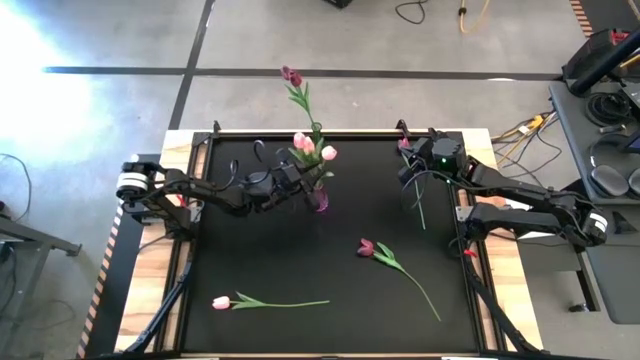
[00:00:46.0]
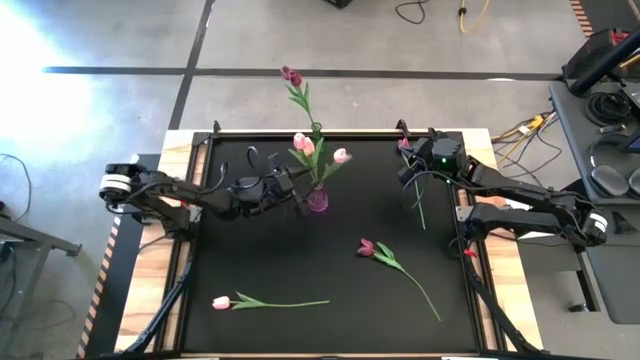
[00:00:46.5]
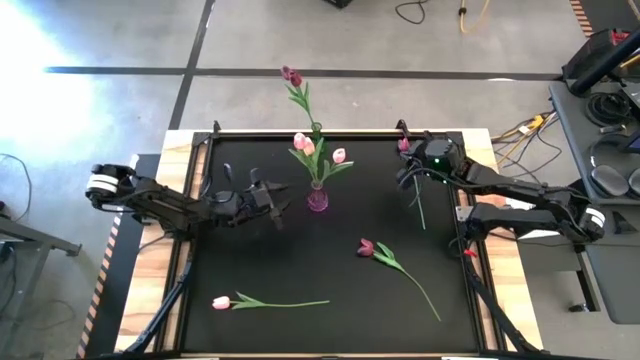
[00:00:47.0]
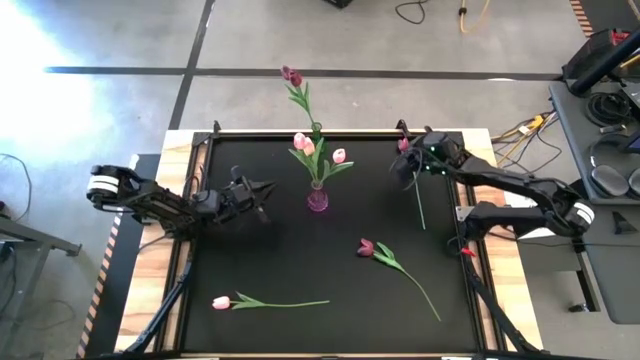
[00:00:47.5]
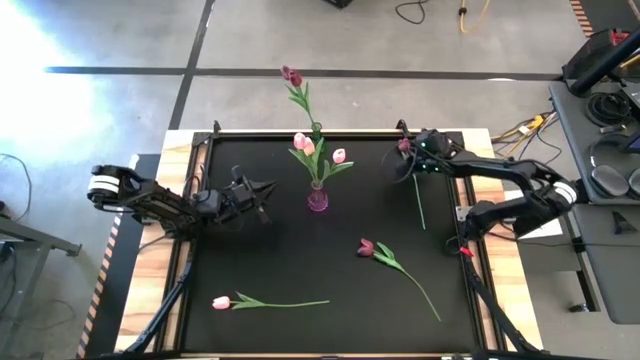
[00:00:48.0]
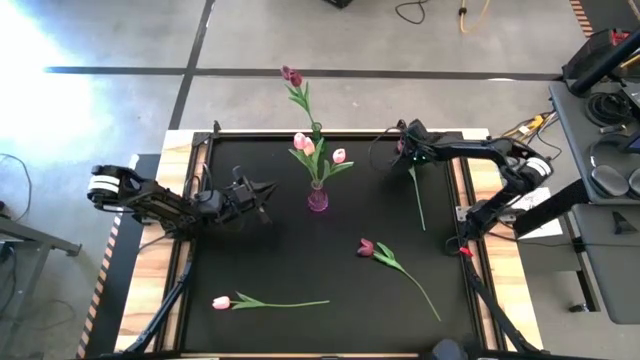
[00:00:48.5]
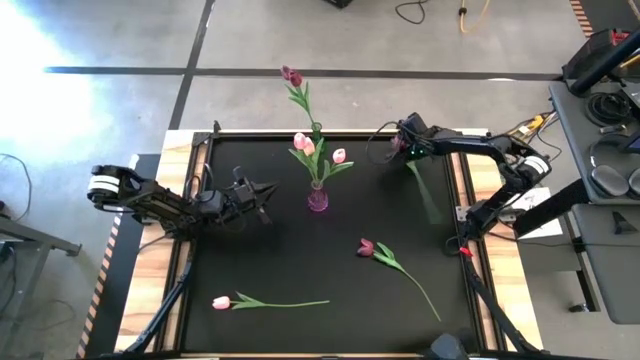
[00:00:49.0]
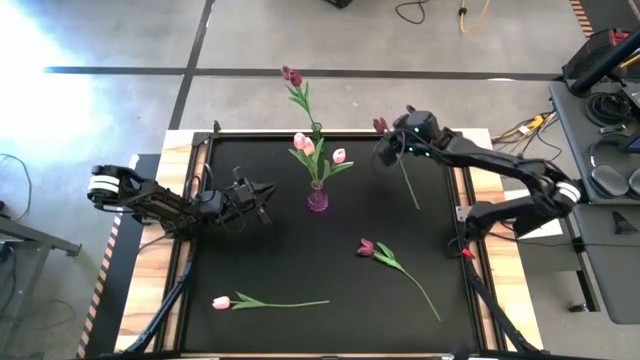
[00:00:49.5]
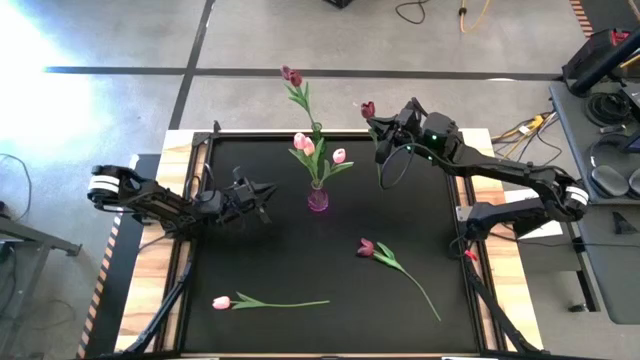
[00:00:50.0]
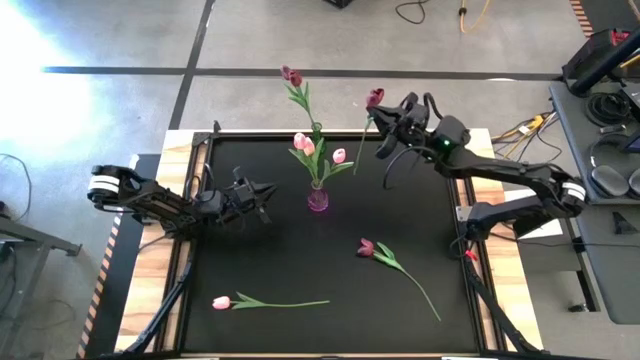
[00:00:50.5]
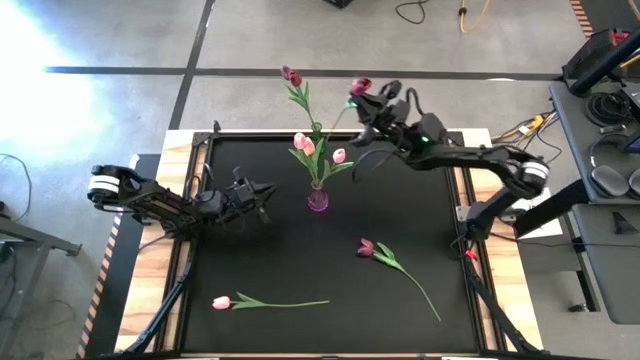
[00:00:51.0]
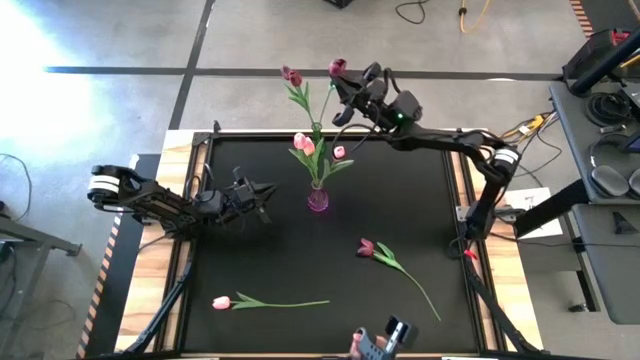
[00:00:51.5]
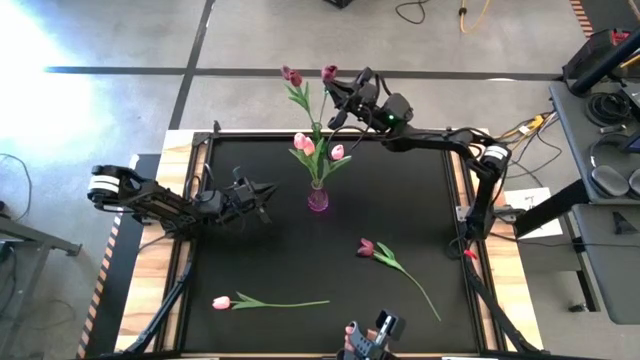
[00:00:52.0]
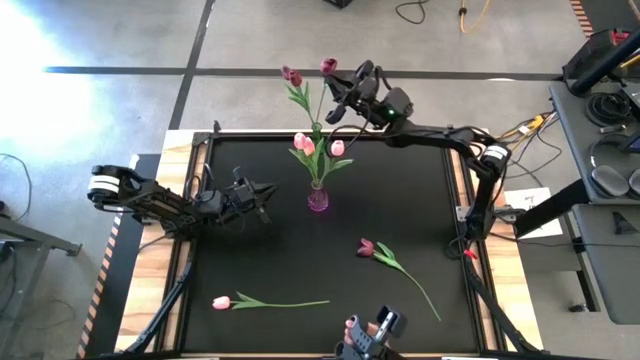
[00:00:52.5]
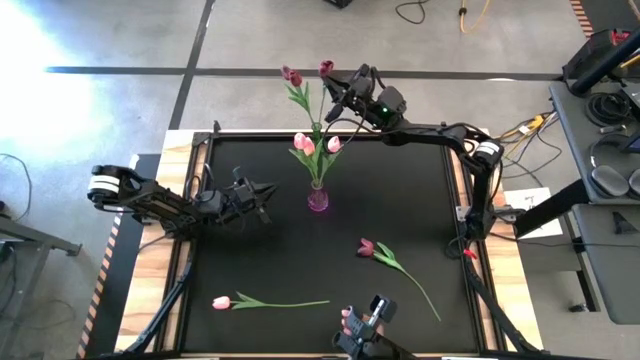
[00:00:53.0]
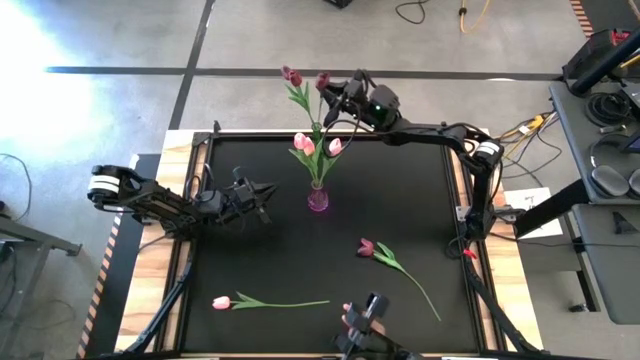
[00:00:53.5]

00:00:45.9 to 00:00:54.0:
Task: Sort flowers into vase by color
Put the red flower into the green vase

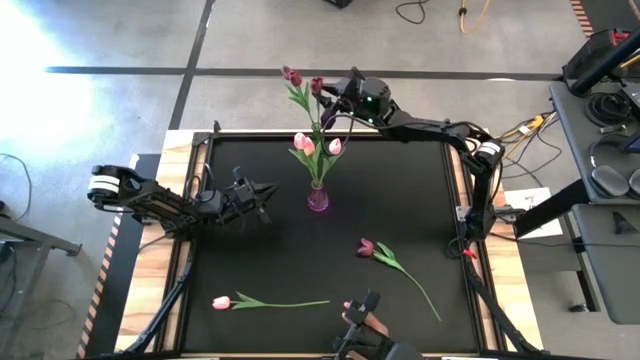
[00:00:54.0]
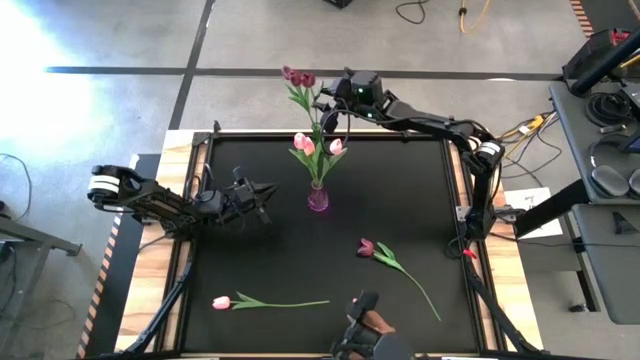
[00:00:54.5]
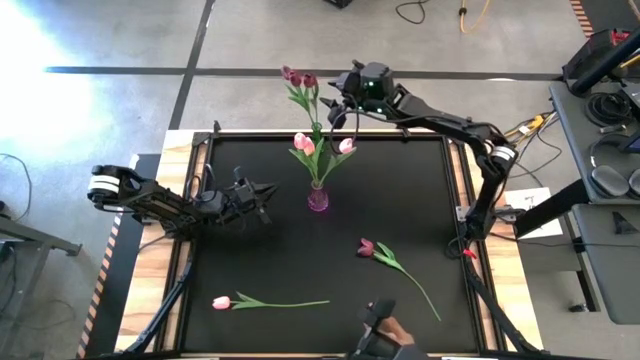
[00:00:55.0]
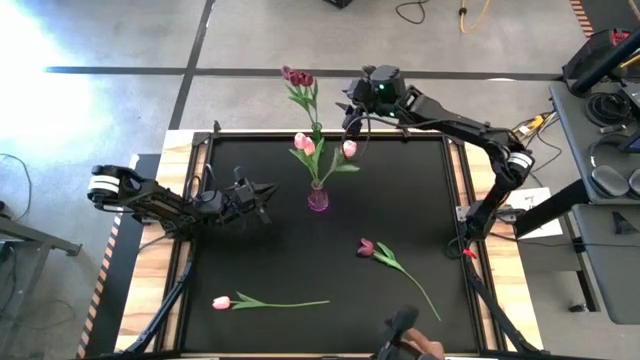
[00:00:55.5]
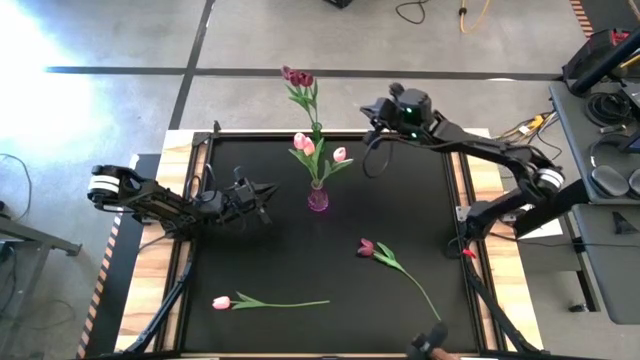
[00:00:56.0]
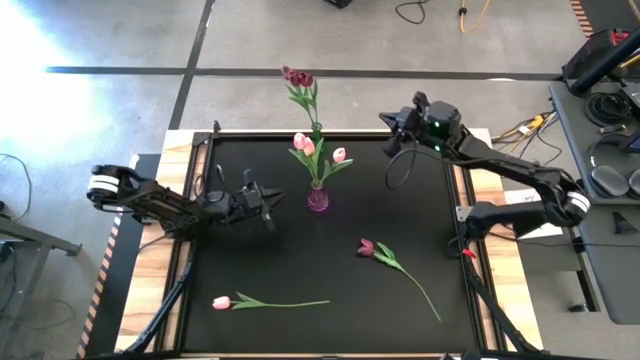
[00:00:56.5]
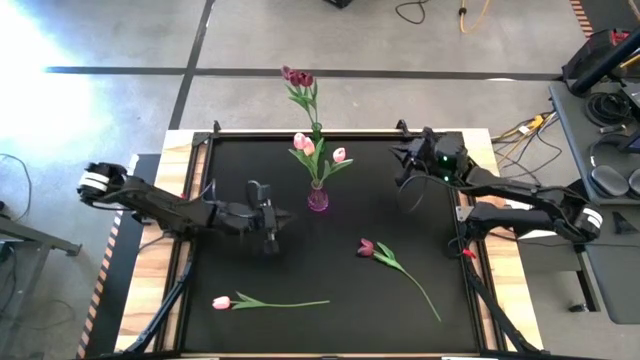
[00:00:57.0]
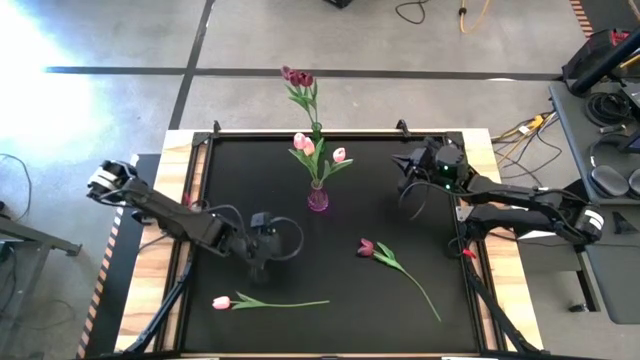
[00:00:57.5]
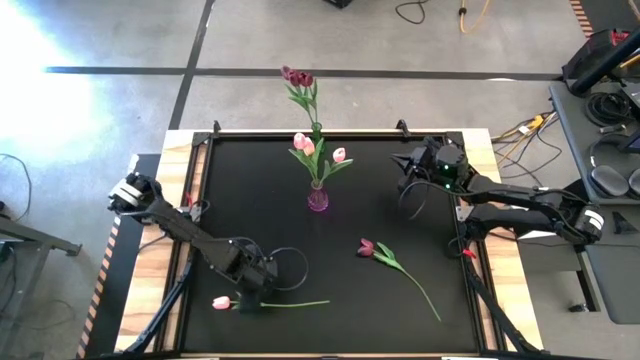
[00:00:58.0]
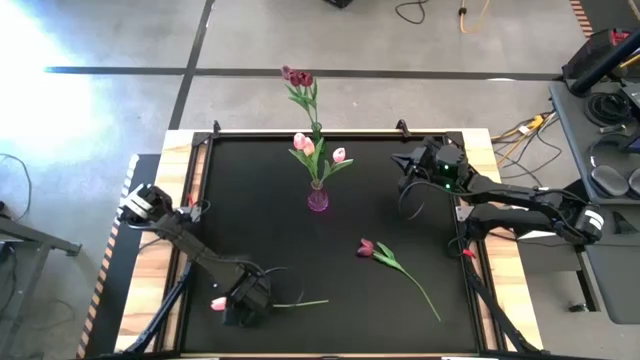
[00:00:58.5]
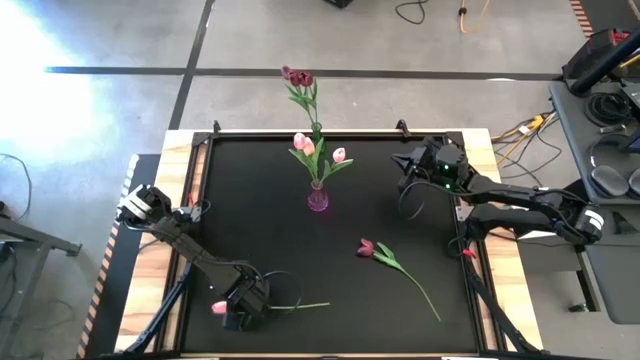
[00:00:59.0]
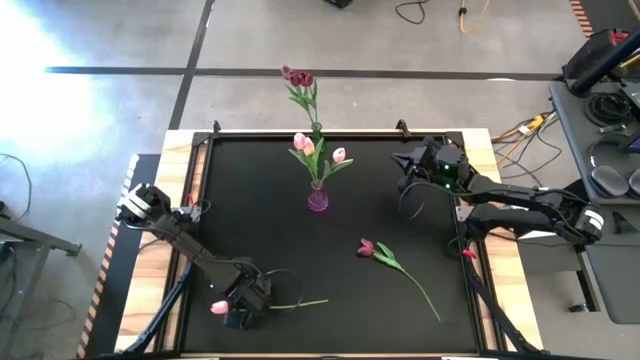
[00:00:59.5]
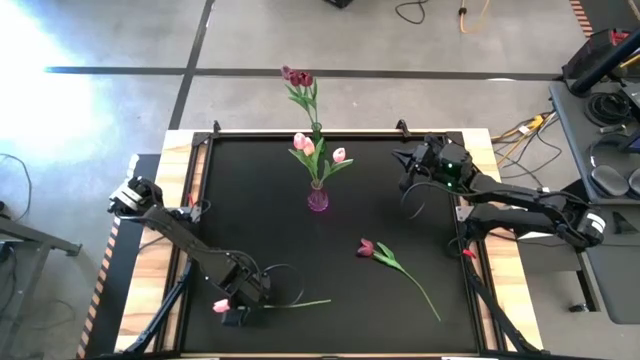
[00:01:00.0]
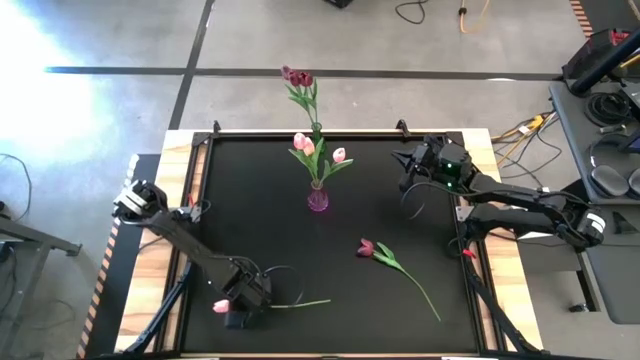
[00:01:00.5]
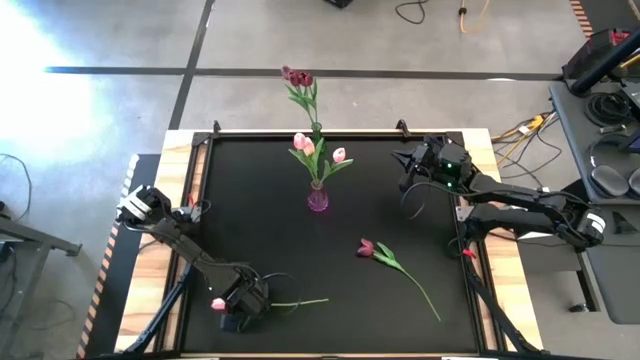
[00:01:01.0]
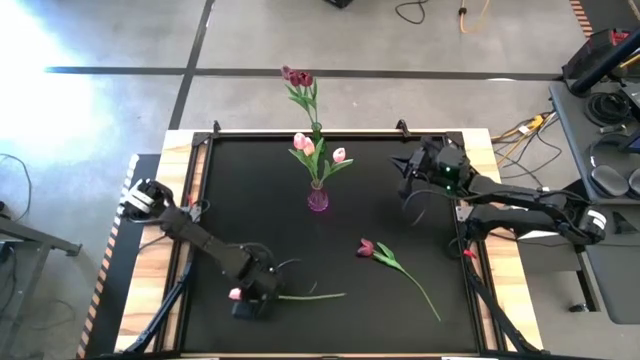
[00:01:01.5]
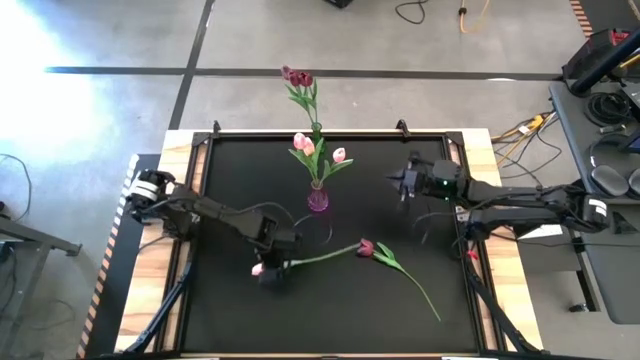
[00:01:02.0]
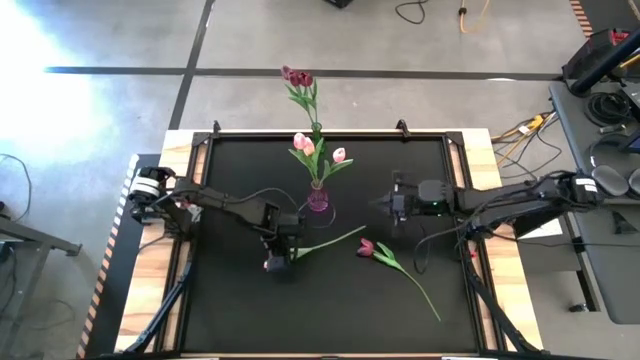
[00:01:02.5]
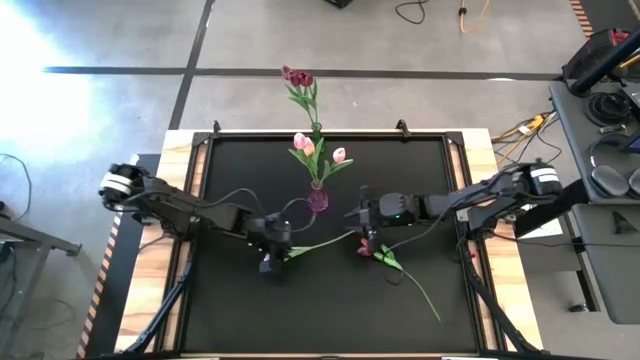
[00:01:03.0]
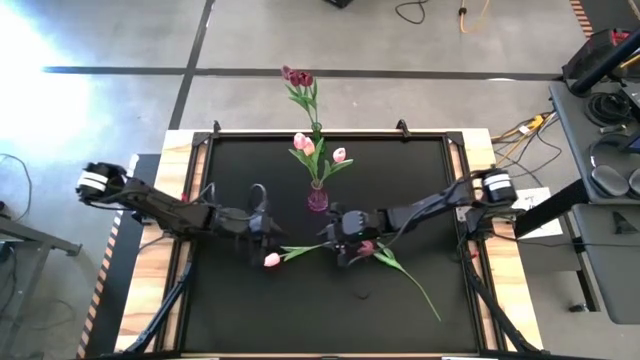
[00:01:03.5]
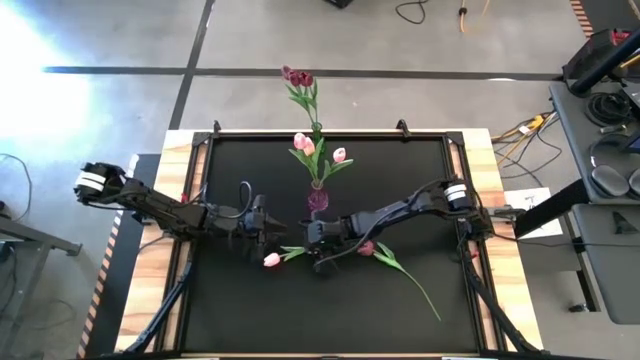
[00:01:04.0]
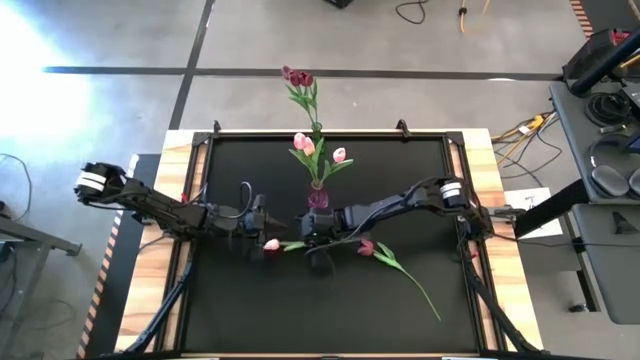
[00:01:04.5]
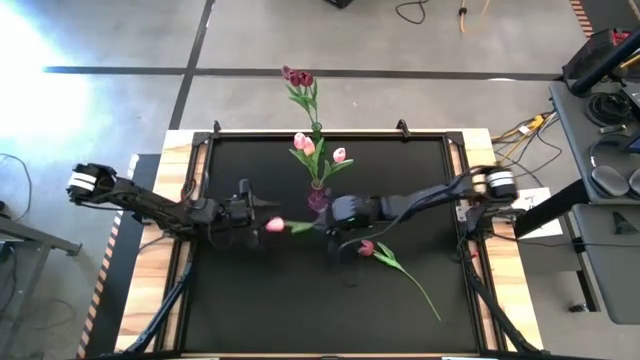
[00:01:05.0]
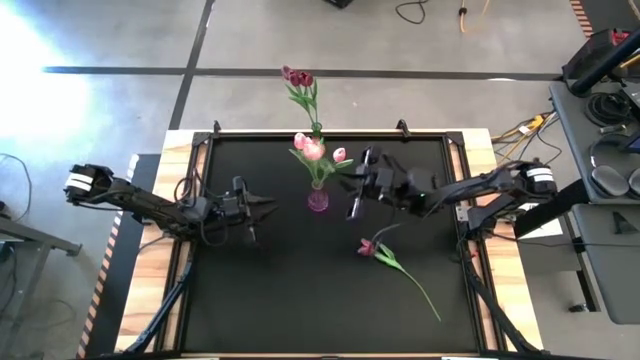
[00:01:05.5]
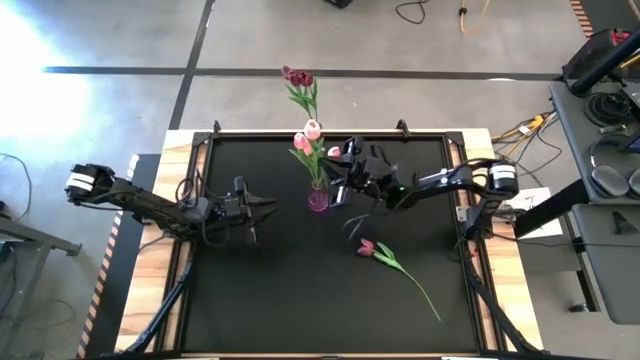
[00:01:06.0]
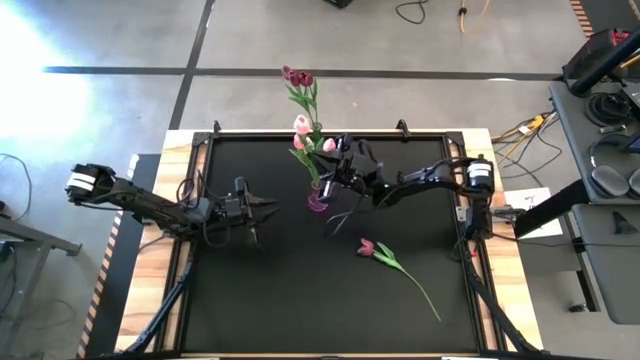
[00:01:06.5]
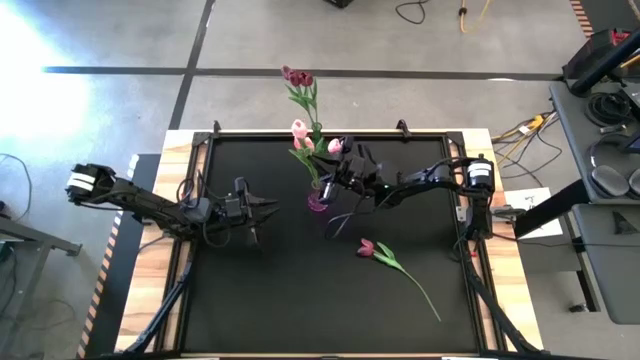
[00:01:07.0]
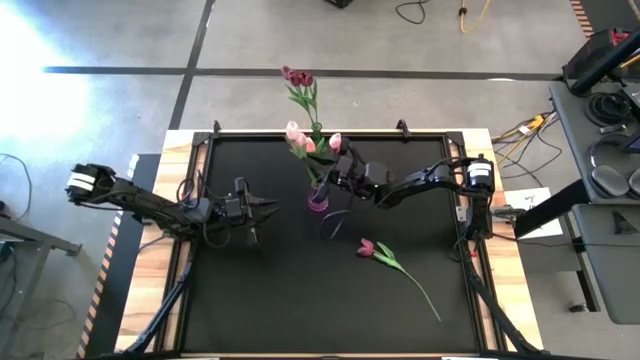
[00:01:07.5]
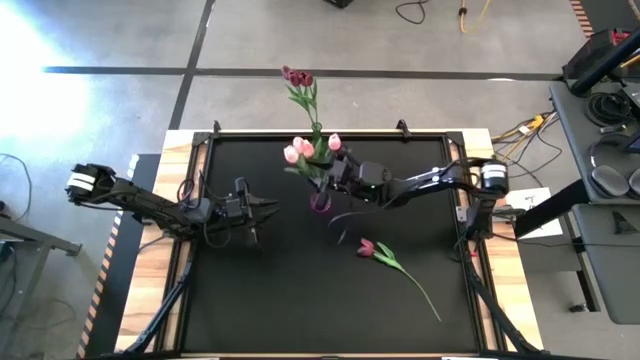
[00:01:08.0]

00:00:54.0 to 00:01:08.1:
Put the purple flower into the purple vase
